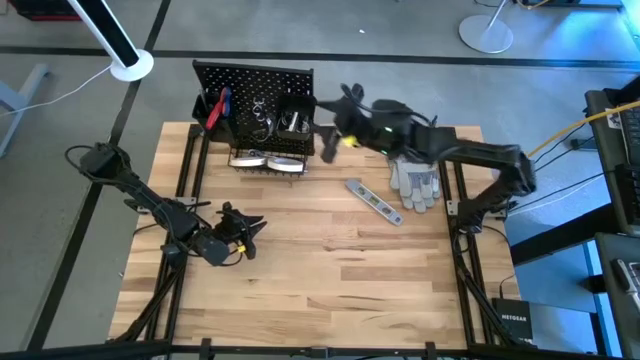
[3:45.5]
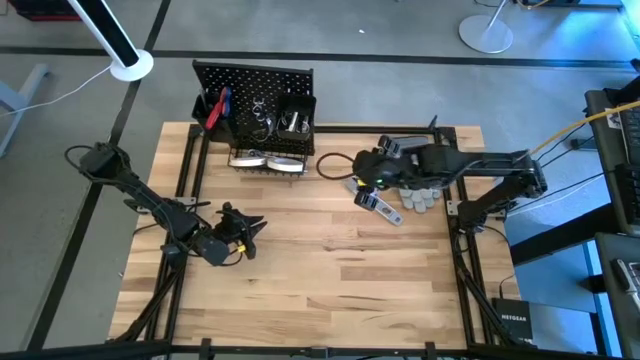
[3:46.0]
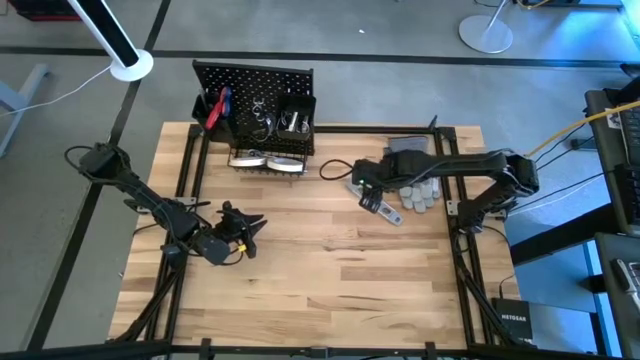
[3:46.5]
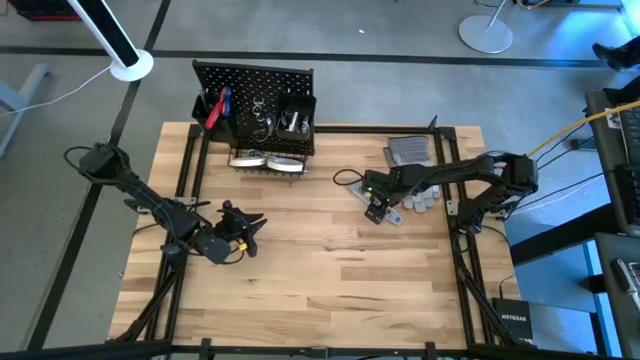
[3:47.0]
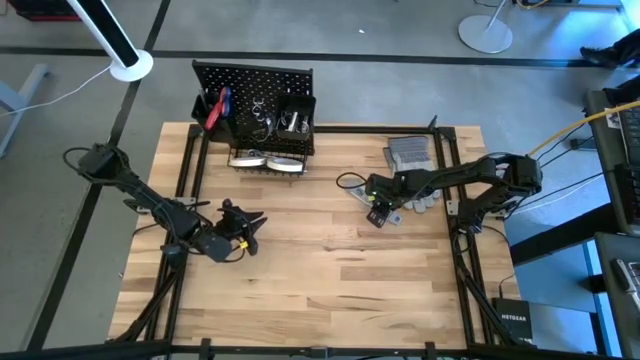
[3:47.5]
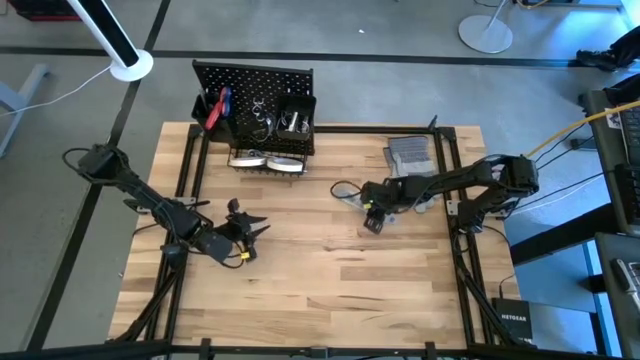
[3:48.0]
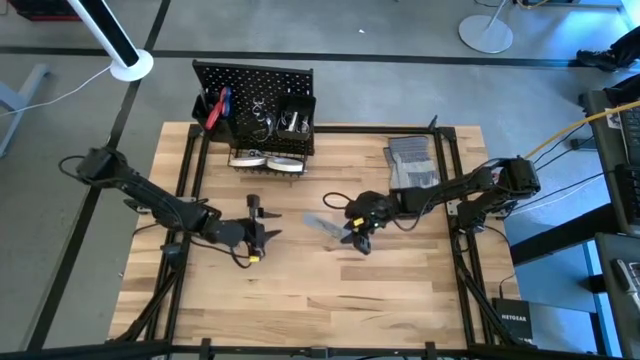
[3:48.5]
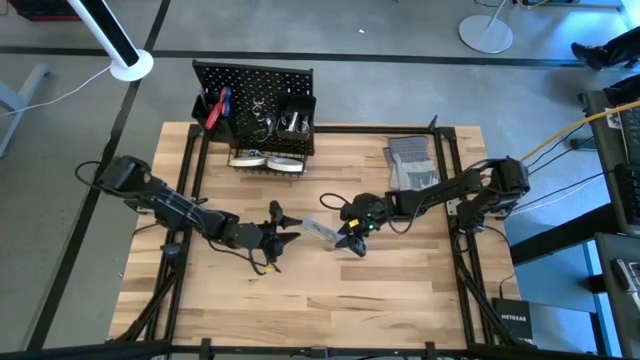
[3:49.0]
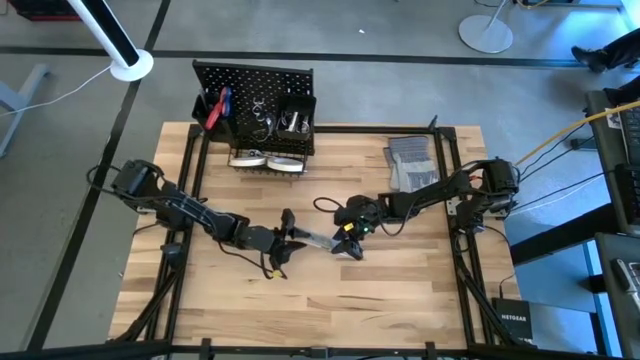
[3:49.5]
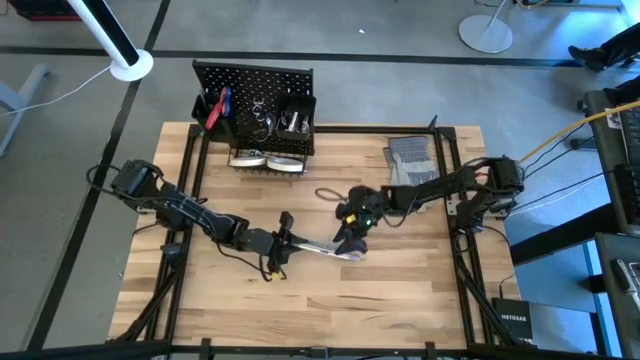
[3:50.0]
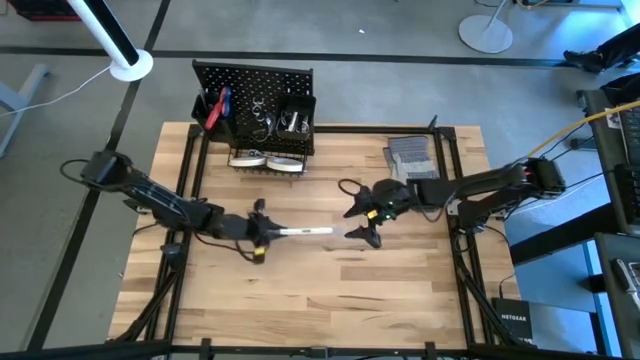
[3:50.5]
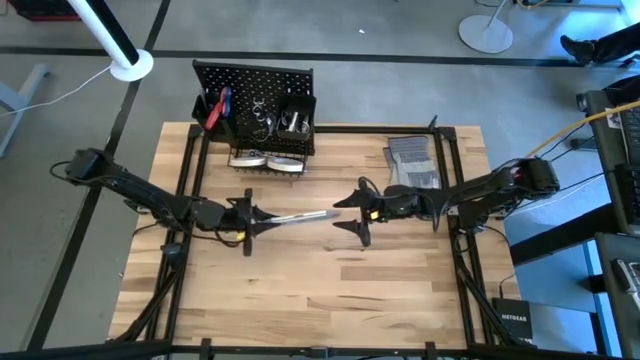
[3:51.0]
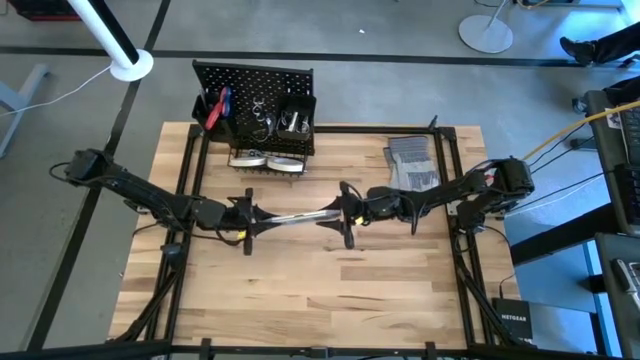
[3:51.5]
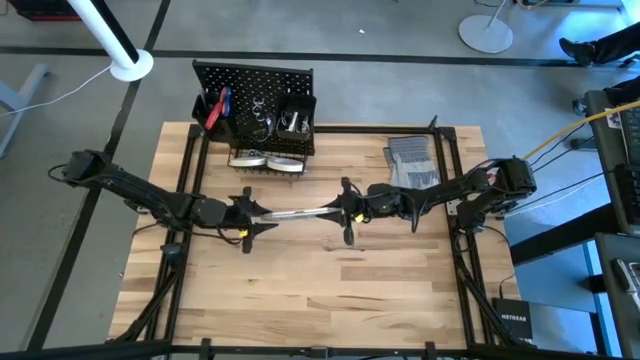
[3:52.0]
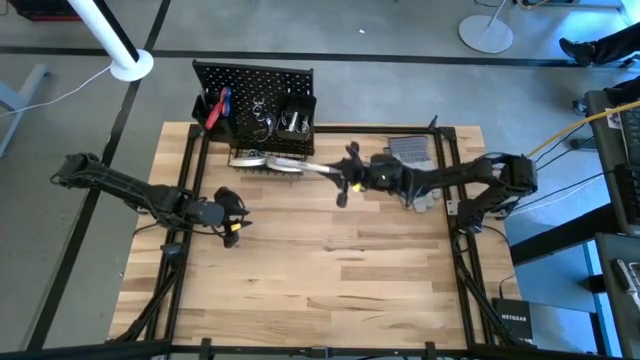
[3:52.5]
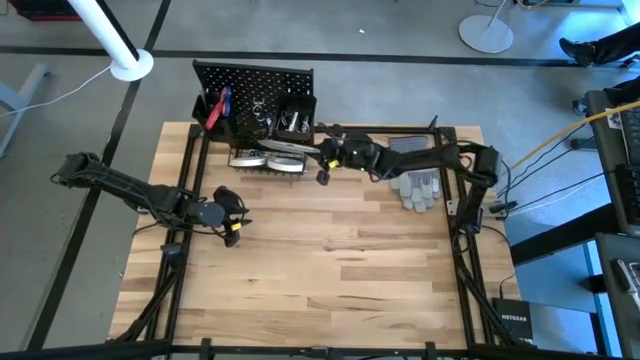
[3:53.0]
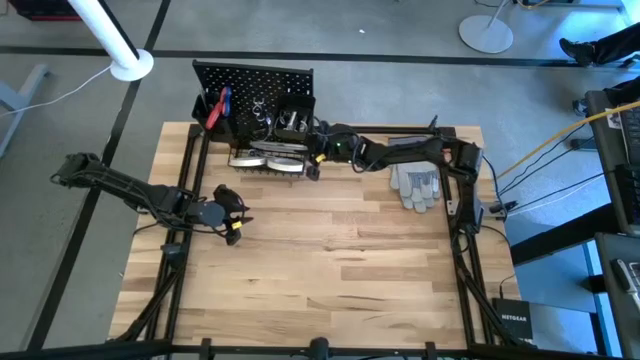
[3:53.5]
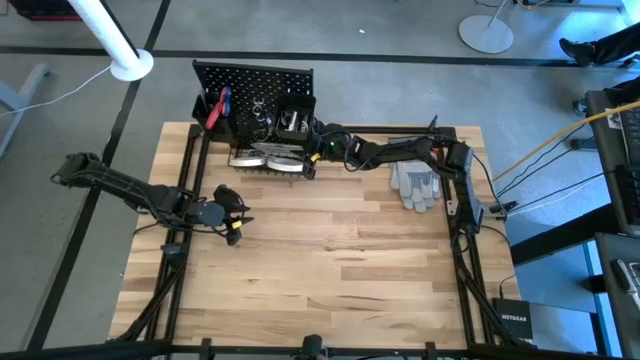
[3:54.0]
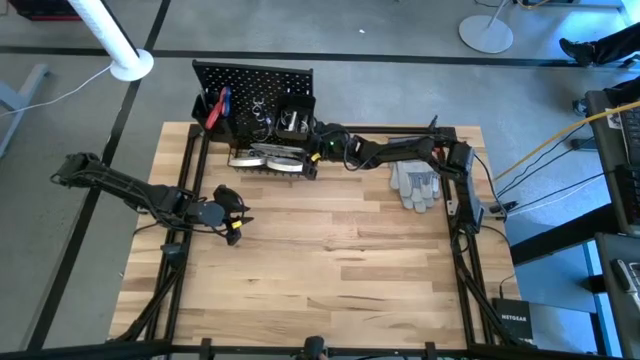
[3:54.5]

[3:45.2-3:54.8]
Task: Hang tools onto peg board
Put the spirit level into the black wire basket on the pegboard

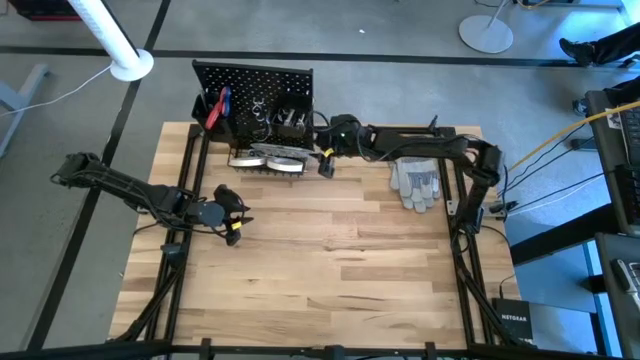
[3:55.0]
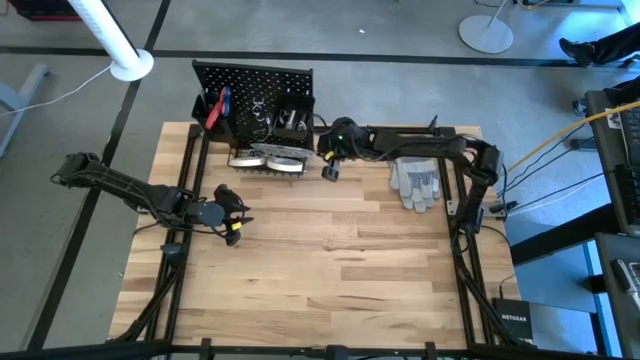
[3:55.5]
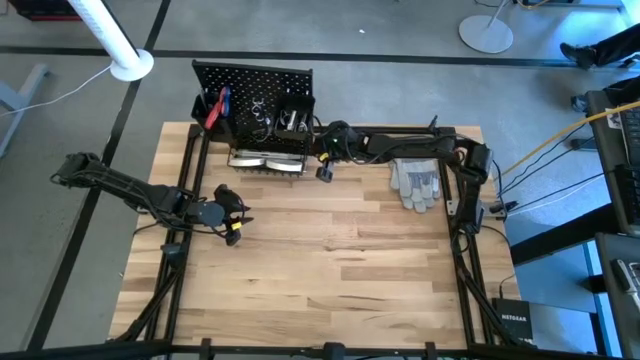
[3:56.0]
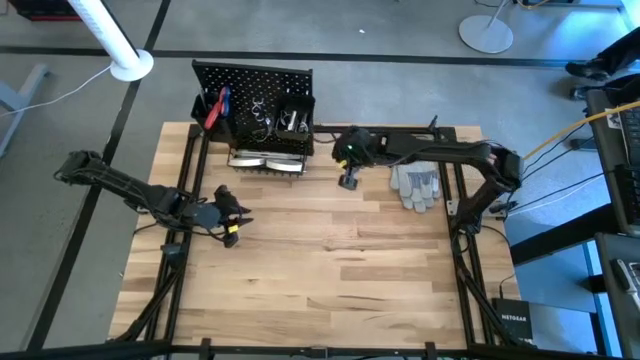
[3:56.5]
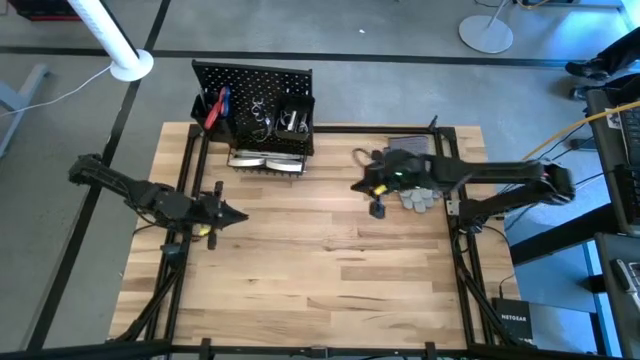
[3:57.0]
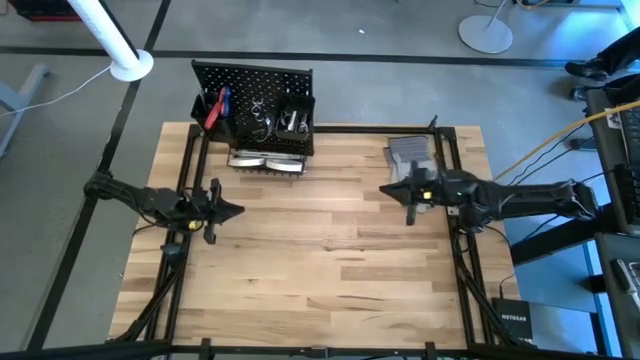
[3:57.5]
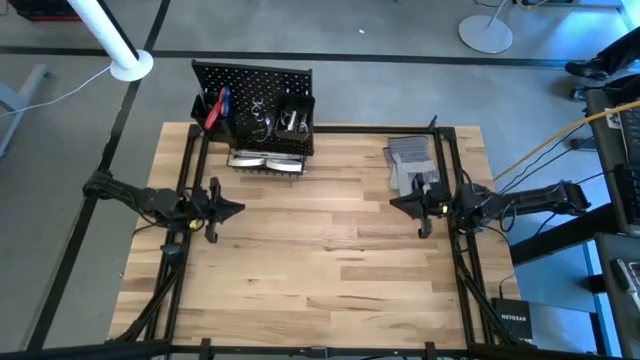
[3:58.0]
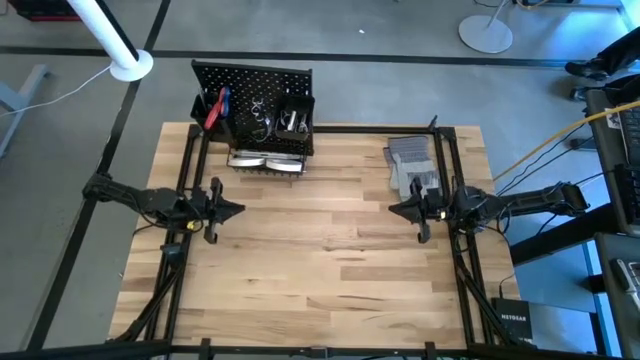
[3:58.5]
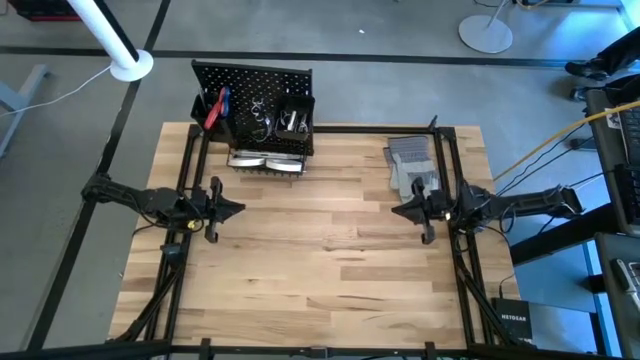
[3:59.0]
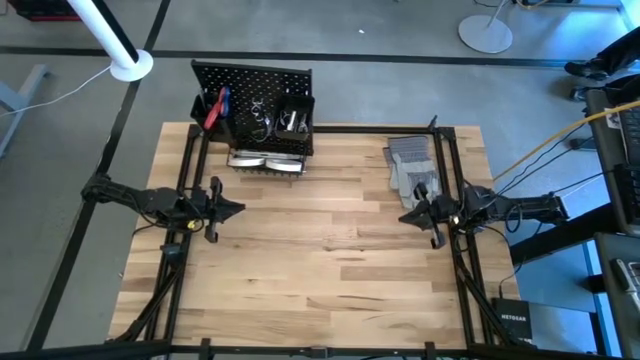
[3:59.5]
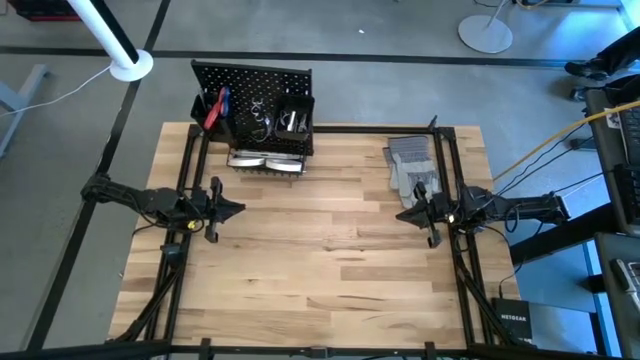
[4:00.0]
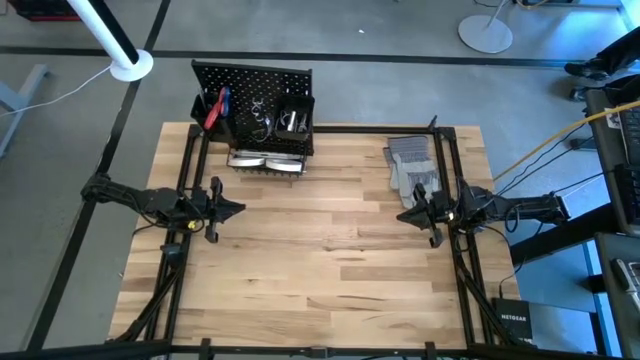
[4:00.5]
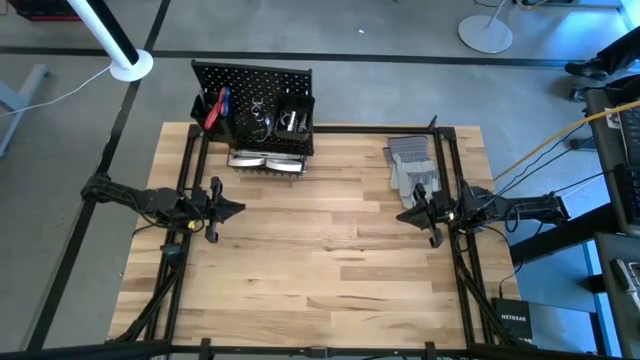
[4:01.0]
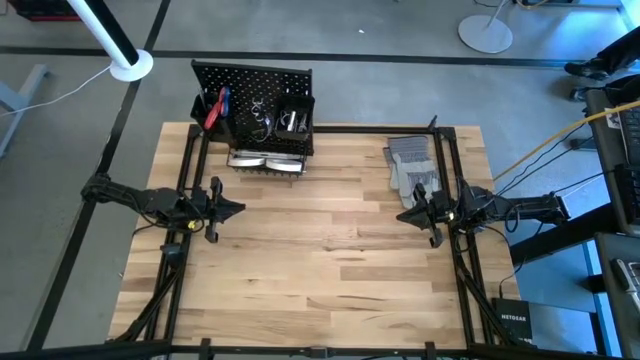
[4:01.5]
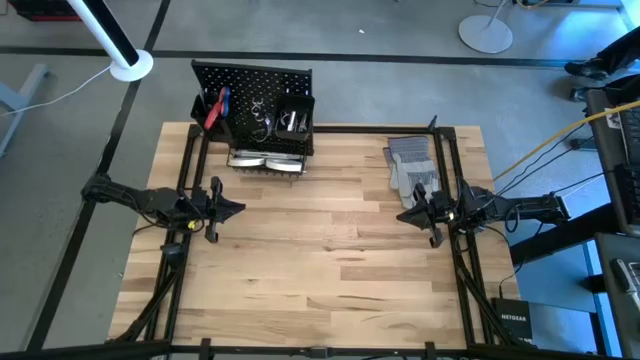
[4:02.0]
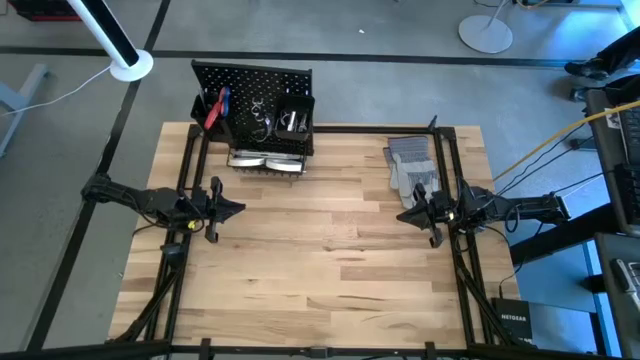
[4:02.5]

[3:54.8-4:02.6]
Return to Home Position

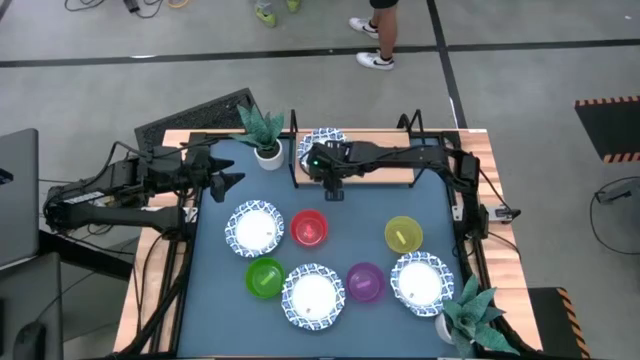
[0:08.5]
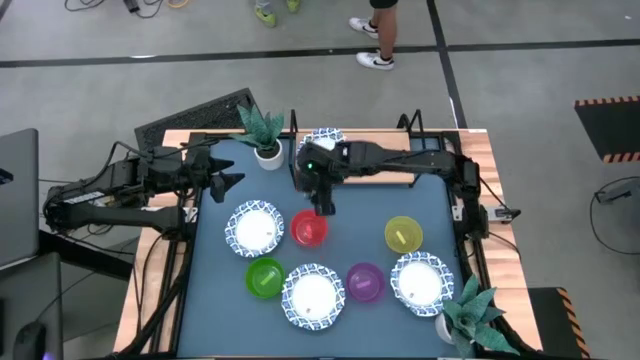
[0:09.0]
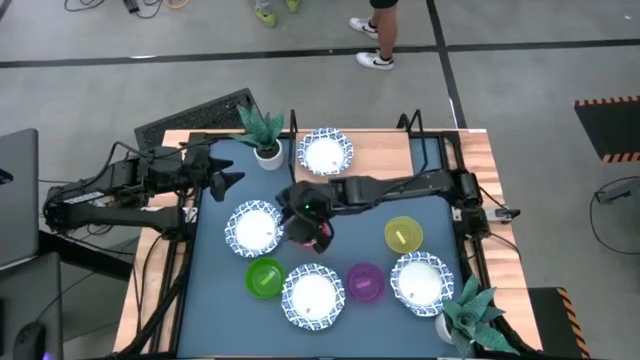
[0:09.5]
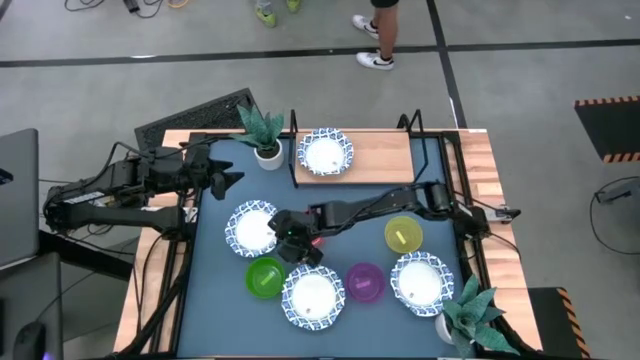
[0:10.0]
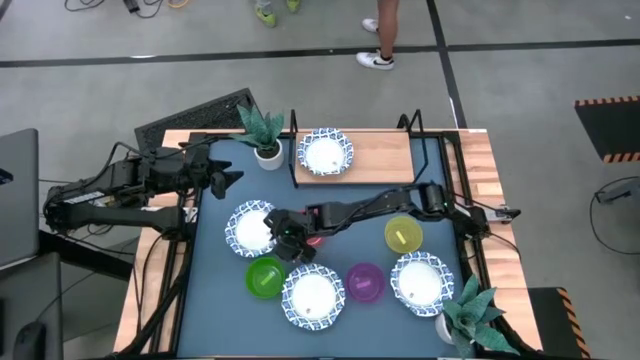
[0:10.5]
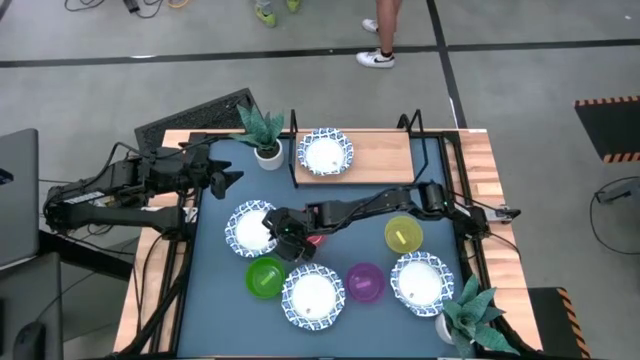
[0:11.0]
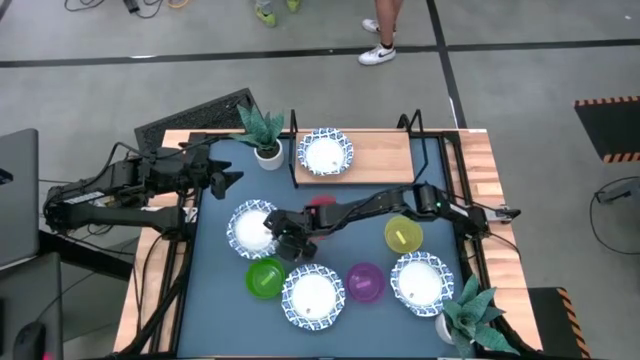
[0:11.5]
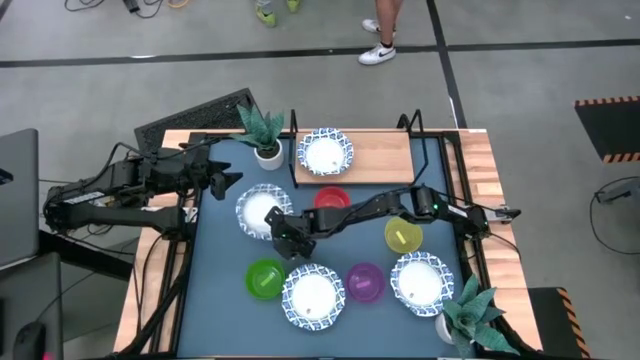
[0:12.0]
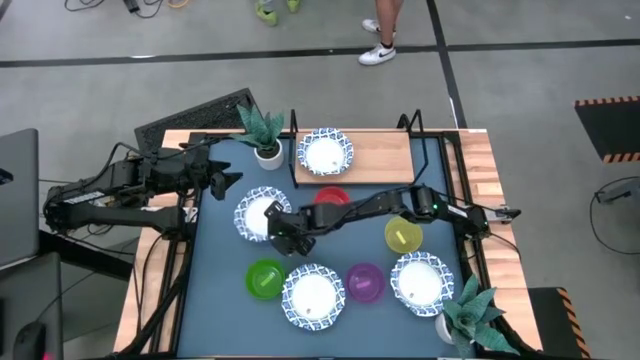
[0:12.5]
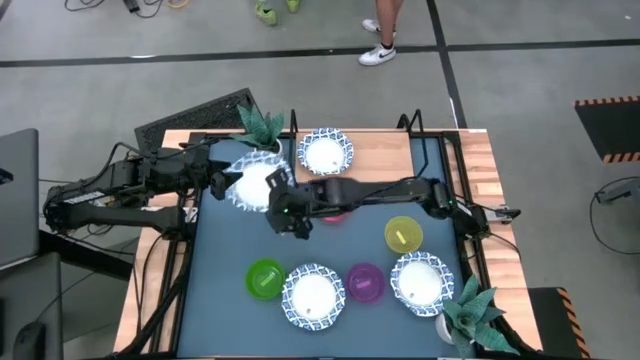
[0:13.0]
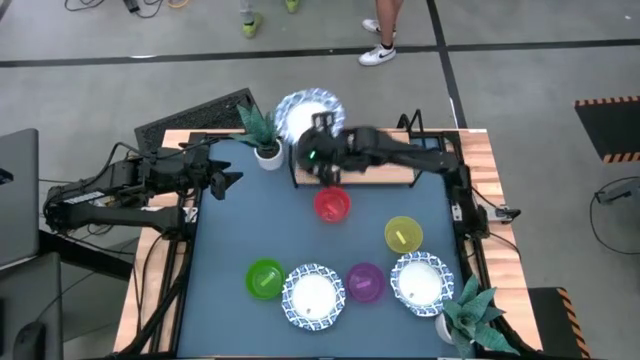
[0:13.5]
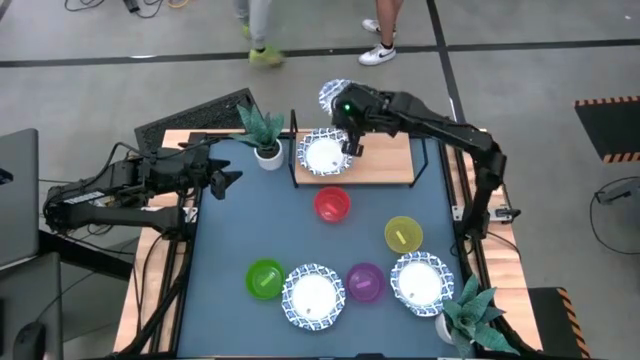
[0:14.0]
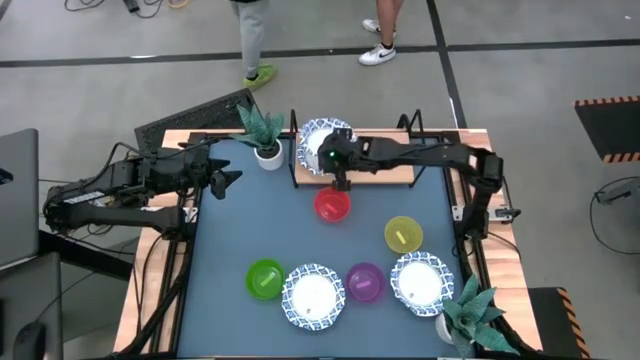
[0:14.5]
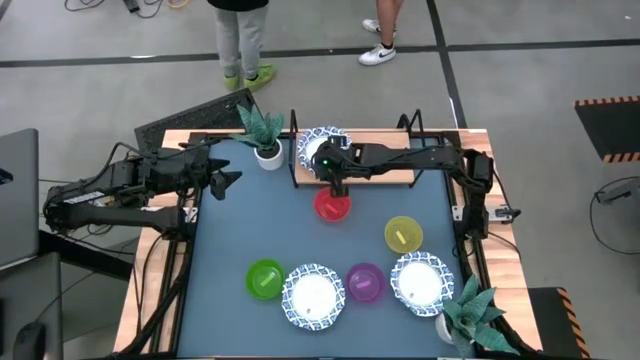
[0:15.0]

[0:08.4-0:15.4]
Task: Place and stack bowls onto a shelf
Stack the white patterned bowl on top of the white patterned bowl on the shelf
